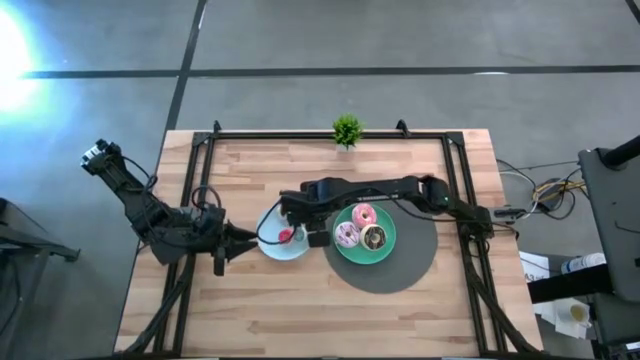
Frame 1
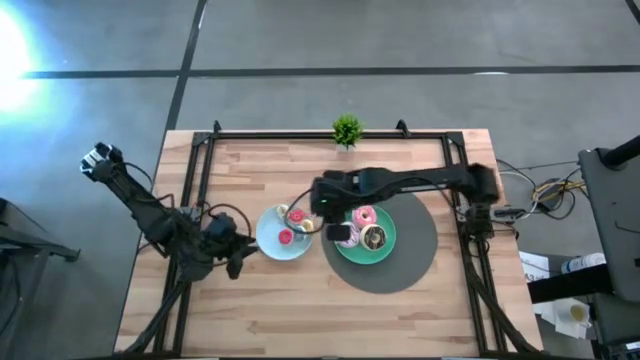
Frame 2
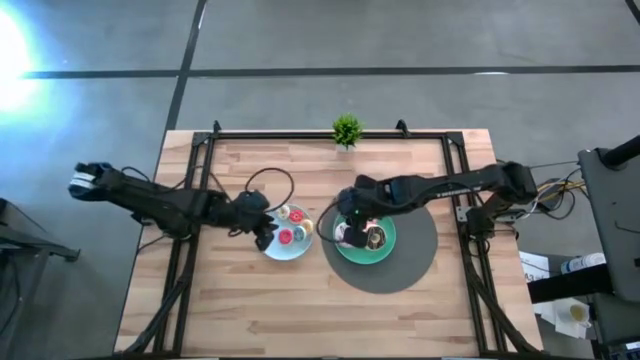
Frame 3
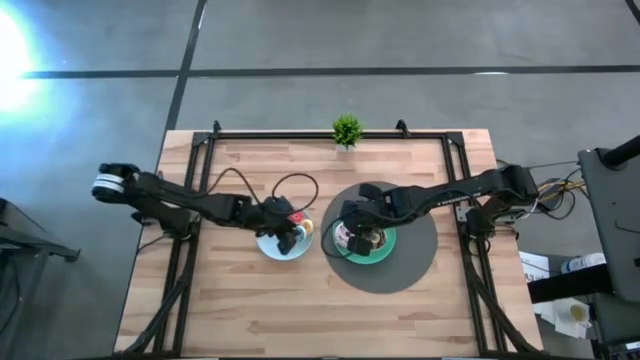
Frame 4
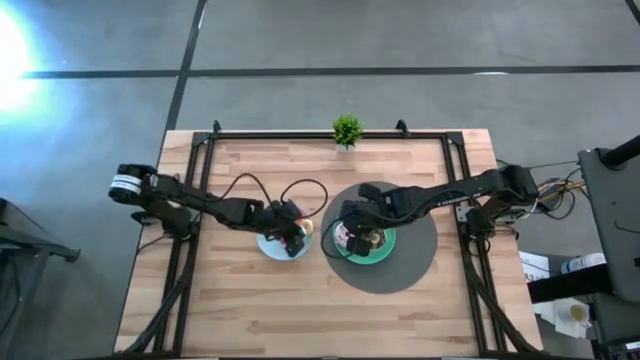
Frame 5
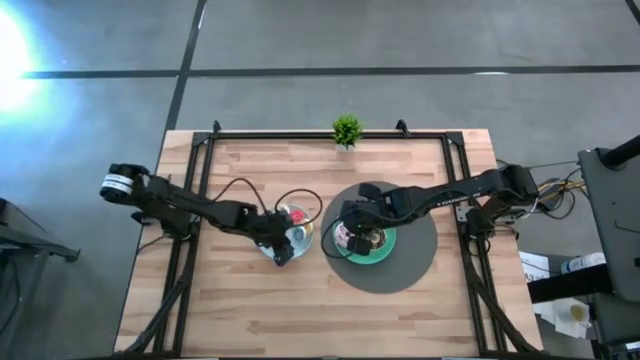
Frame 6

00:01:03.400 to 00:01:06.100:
Task: Pick & Place donuts
Adjust the small red donut on the light blue plate to maximize to space

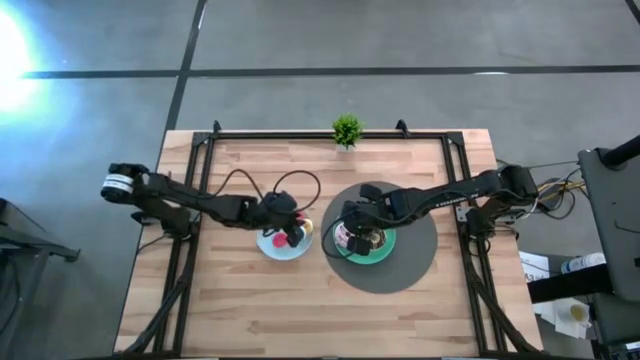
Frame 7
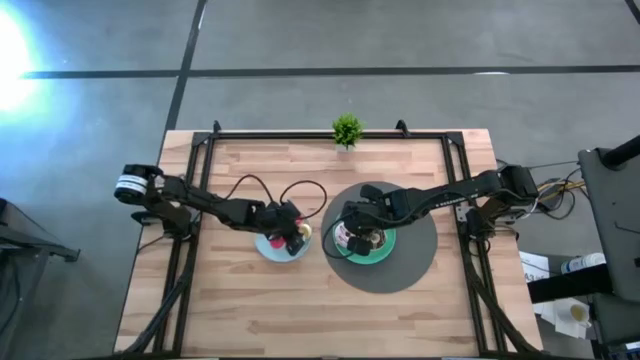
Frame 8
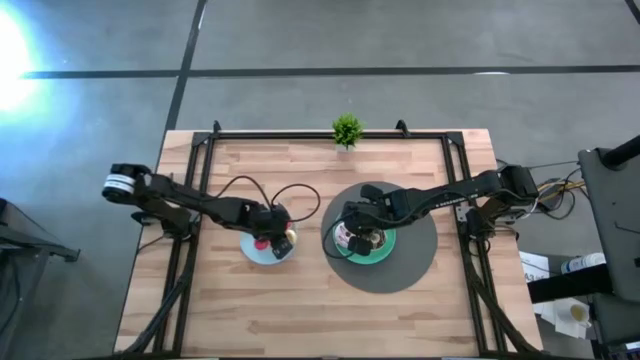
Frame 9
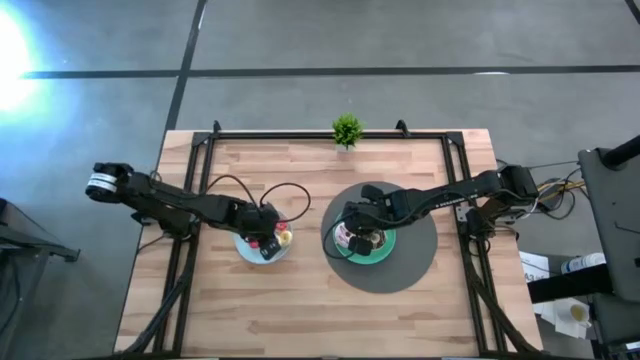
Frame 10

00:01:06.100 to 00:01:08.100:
Adjust the small blue donut on the light blue plate to maximize to space

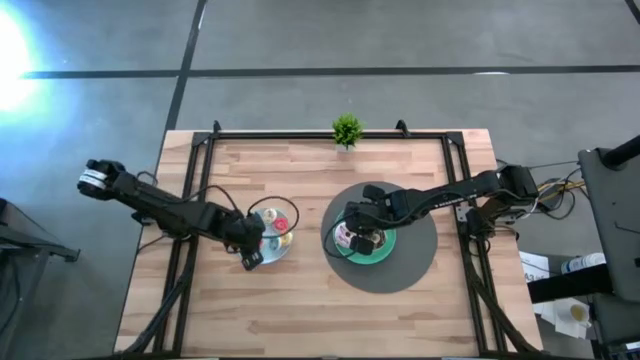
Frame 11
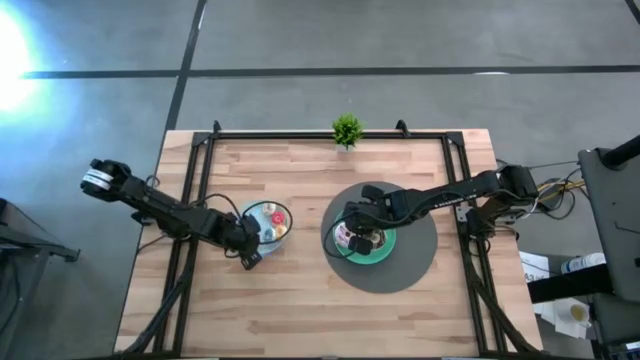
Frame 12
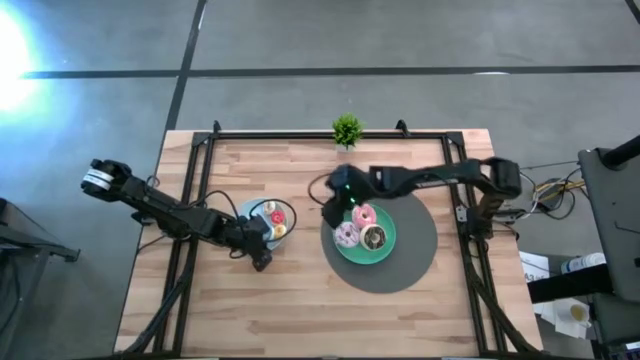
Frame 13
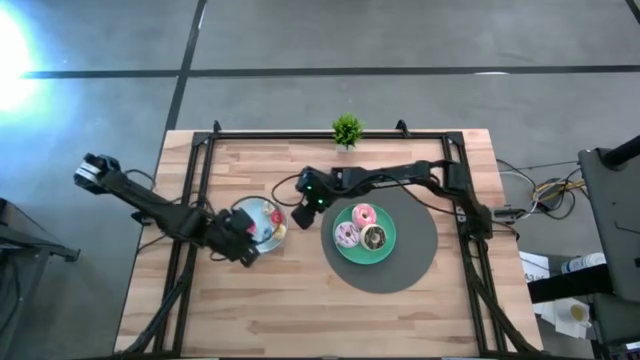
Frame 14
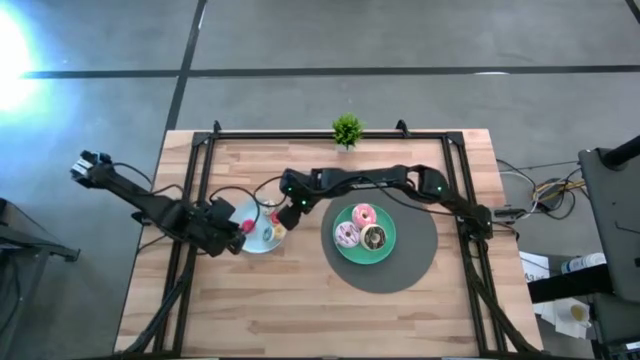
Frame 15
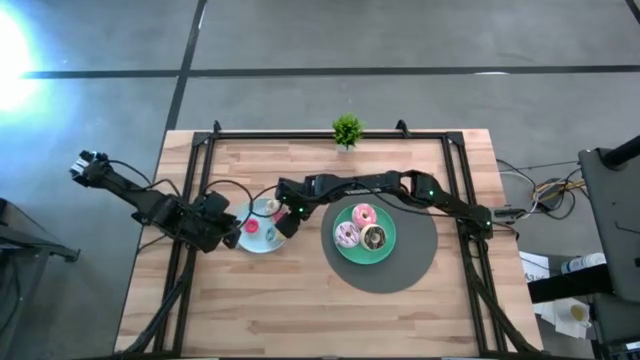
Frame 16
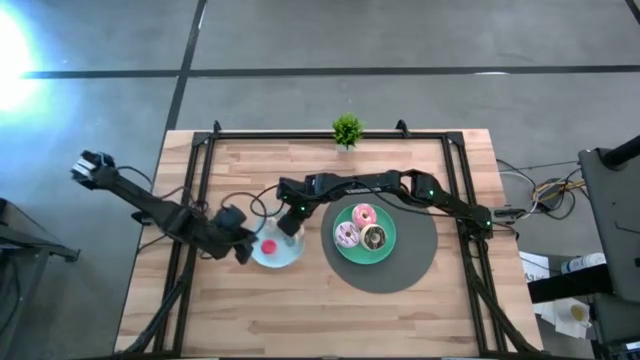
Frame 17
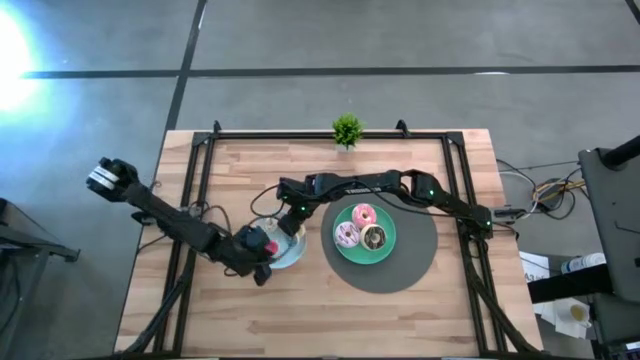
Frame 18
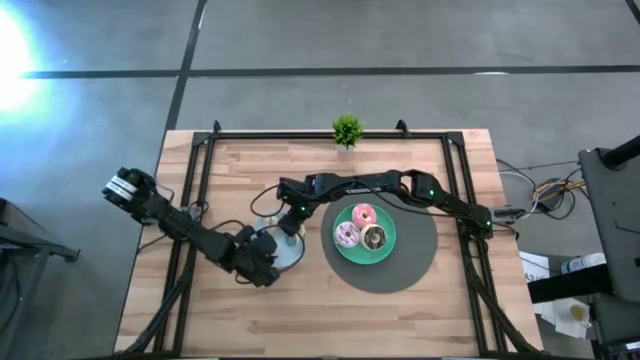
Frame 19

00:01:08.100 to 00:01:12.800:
Adjust the small red donut on the light blue plate to maximize to space

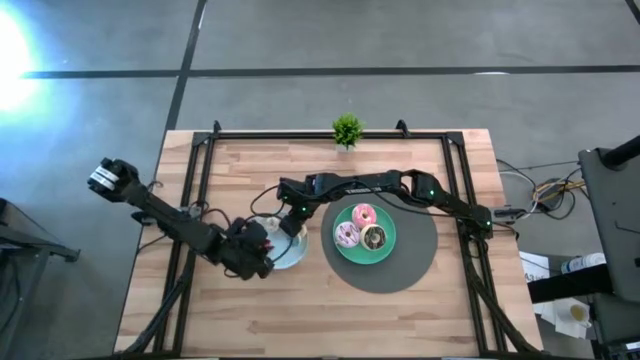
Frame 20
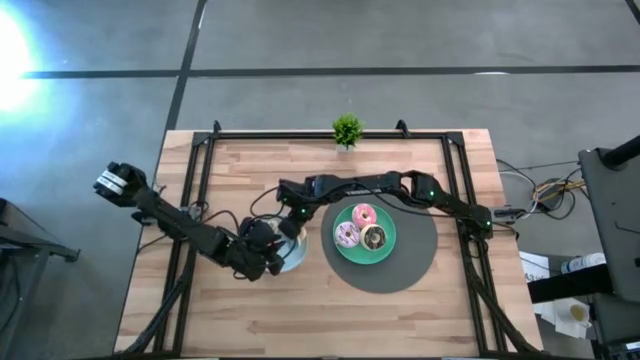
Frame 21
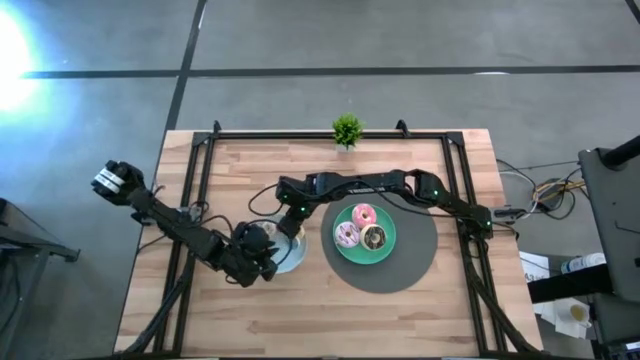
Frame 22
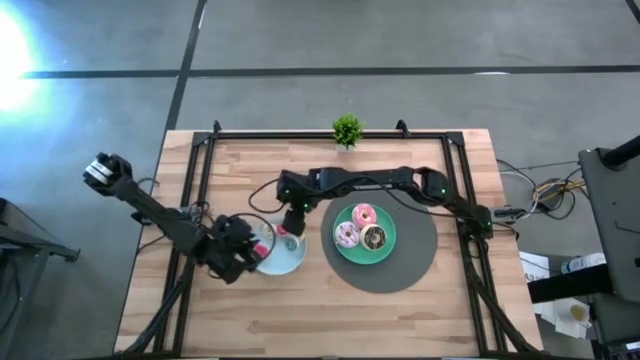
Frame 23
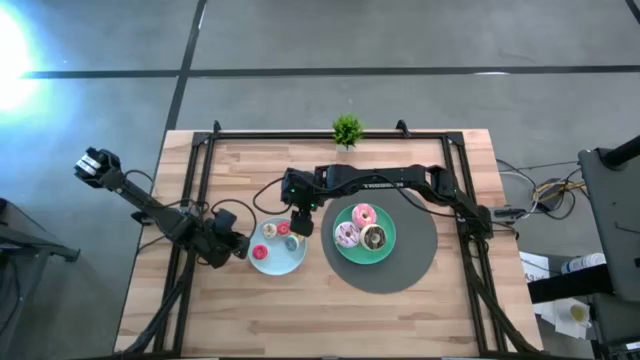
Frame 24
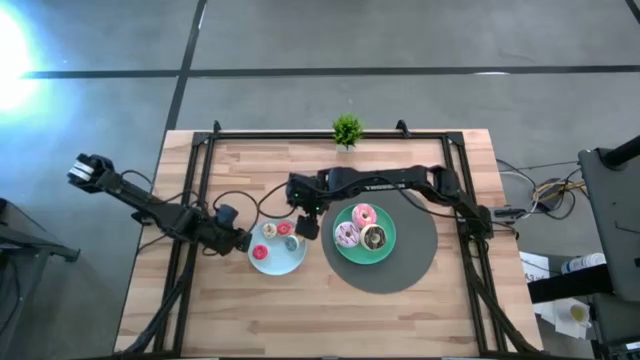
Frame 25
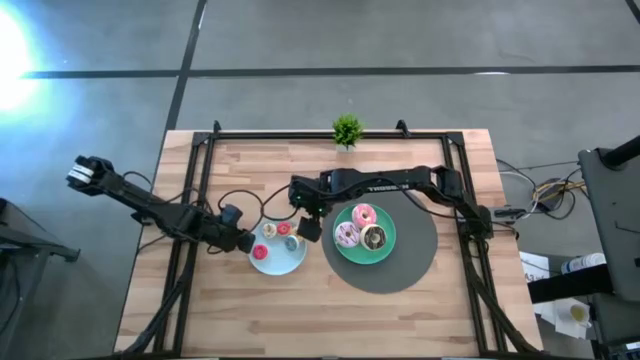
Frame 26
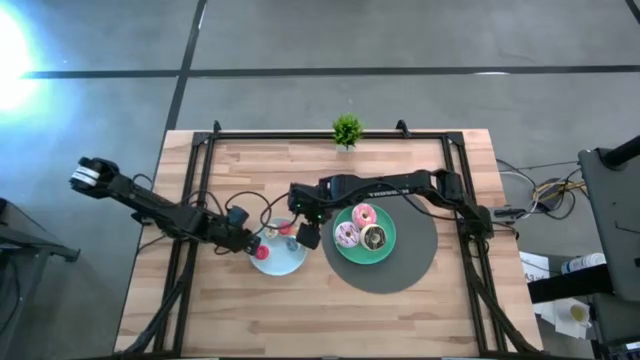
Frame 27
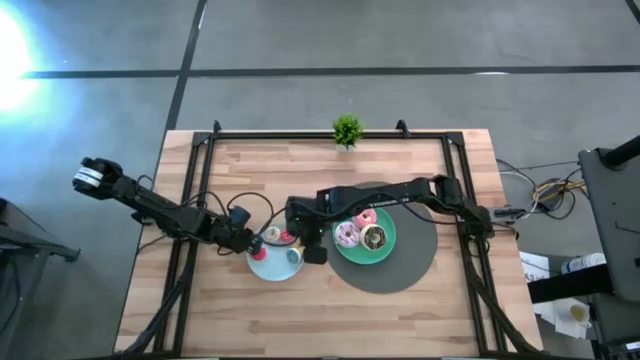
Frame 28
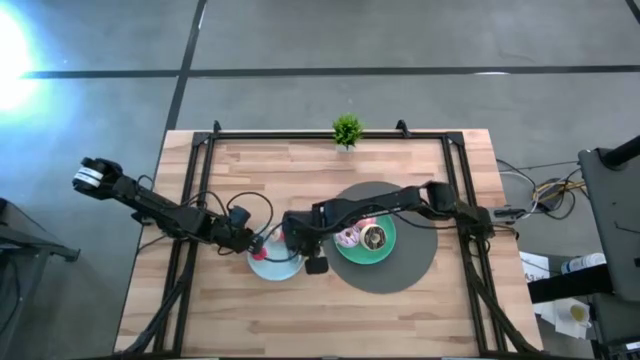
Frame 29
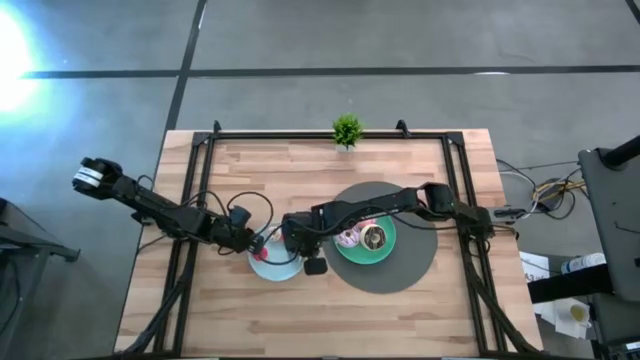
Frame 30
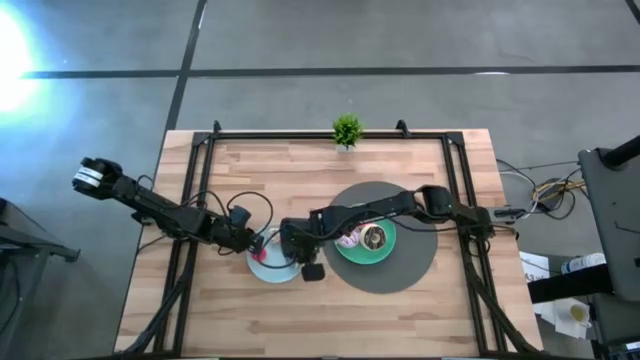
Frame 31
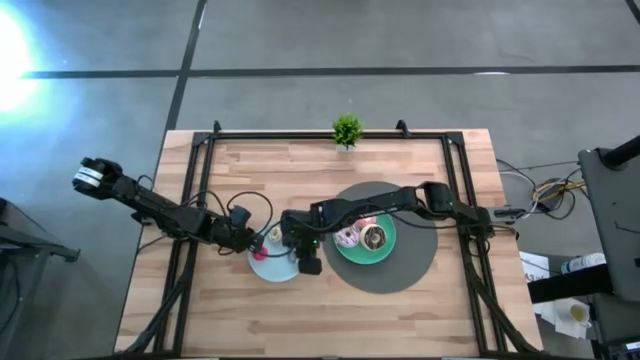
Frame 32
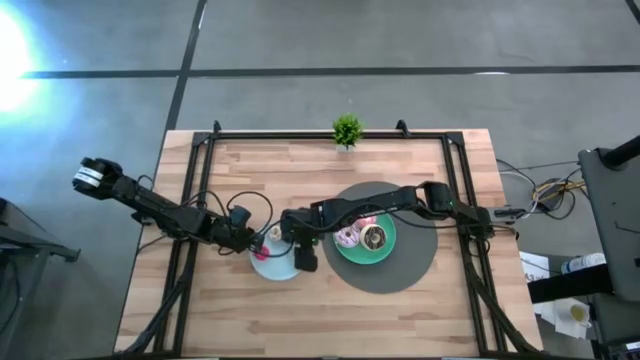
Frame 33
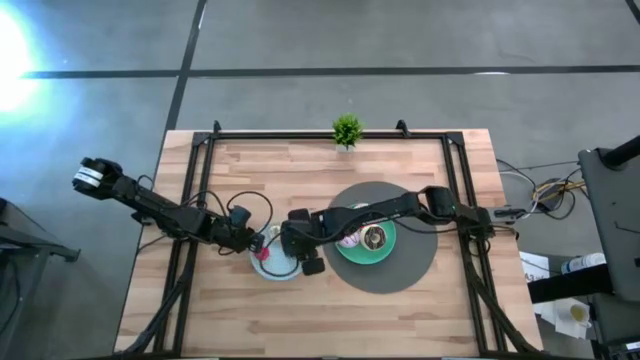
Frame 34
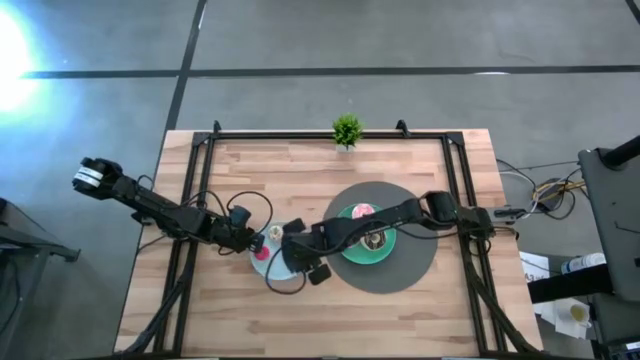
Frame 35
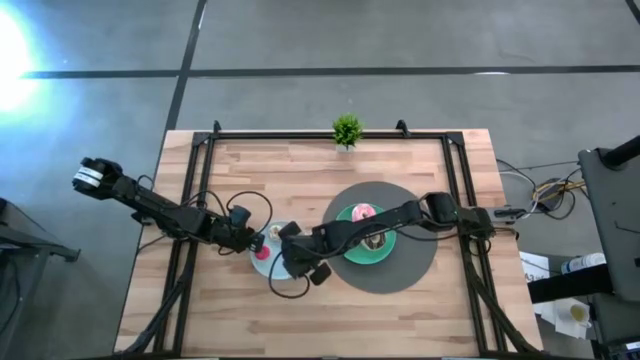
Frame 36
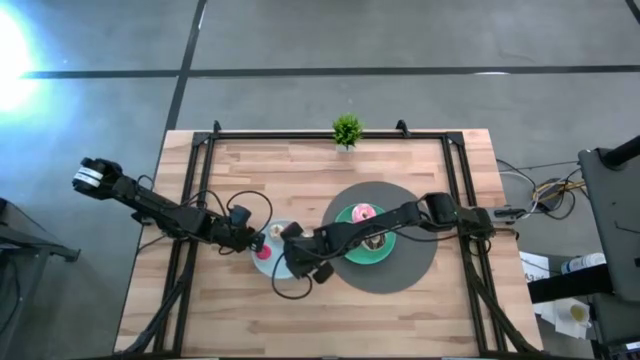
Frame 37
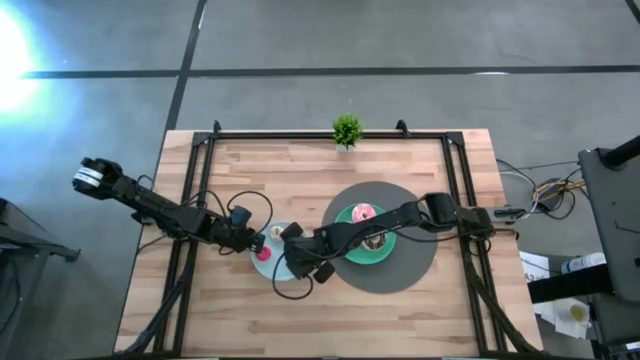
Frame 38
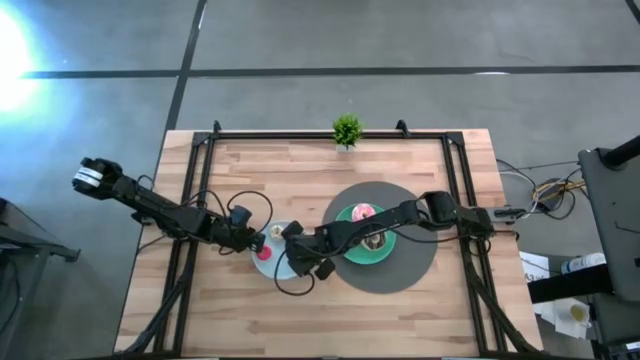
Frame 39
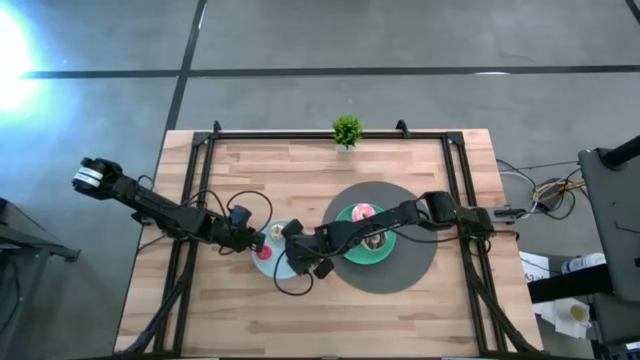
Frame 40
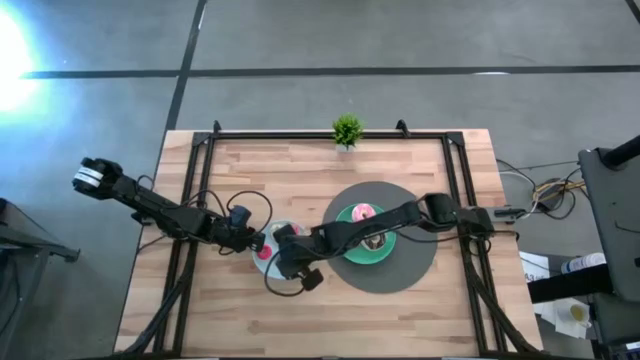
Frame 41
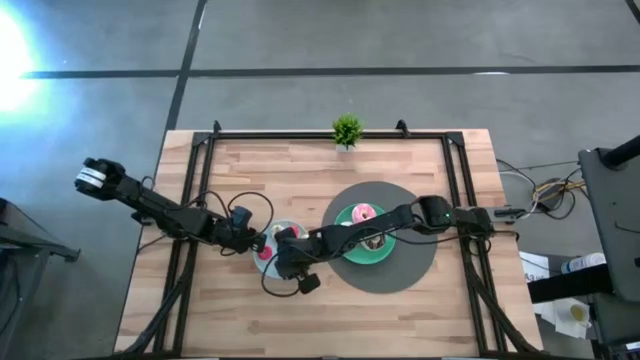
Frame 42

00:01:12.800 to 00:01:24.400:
Adjust the small blue donut on the light blue plate to align the position

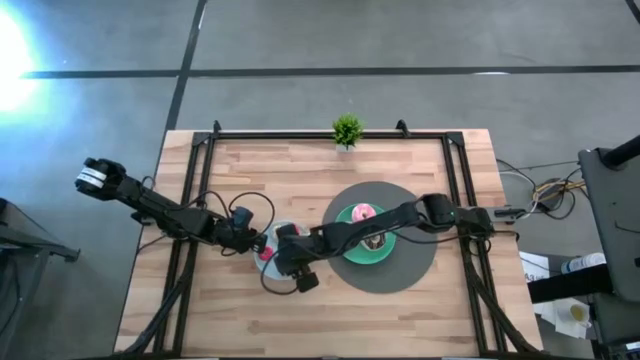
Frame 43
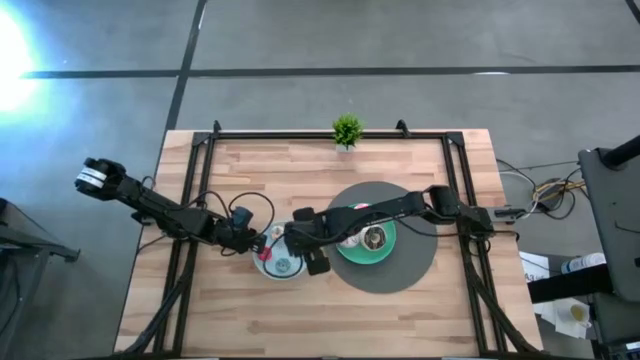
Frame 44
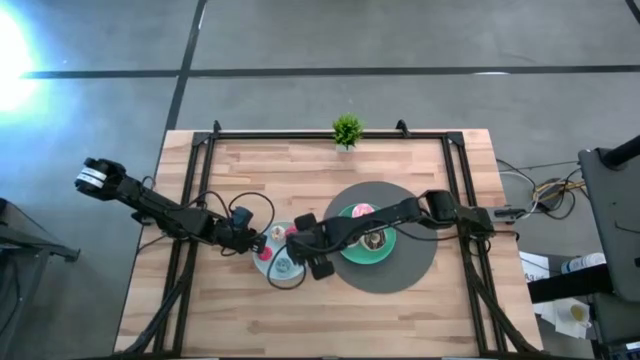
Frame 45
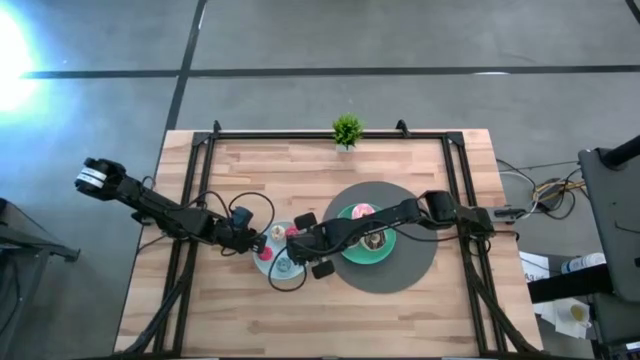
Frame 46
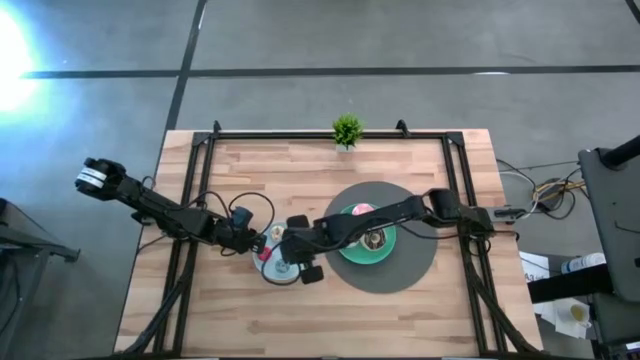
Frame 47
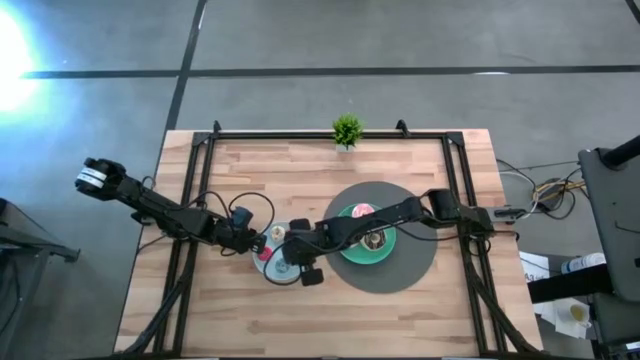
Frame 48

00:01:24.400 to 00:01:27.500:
Adjust the small yellow donut on the light blue plate to align the position
